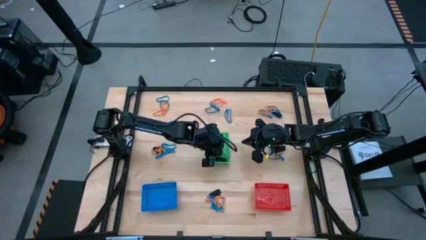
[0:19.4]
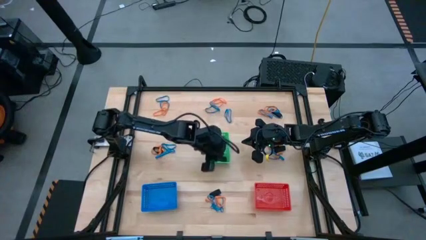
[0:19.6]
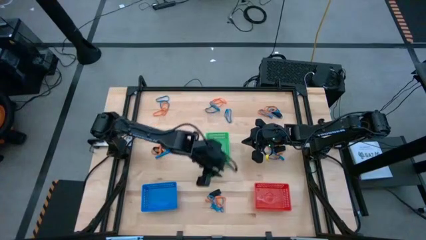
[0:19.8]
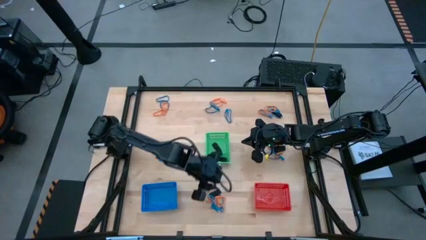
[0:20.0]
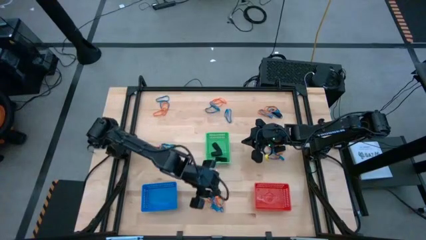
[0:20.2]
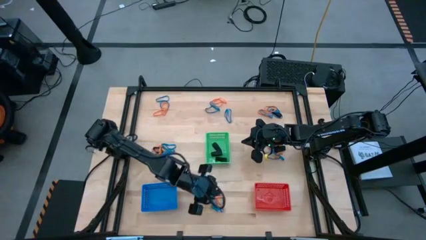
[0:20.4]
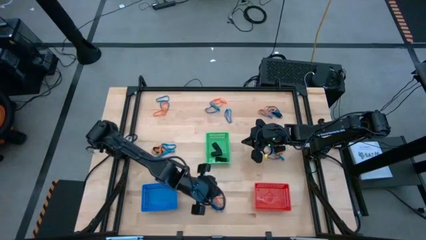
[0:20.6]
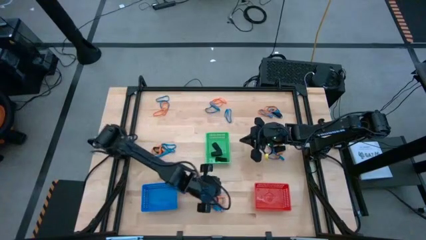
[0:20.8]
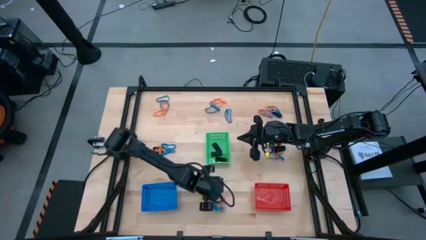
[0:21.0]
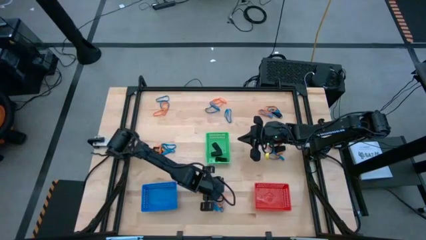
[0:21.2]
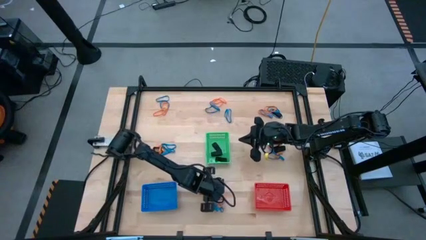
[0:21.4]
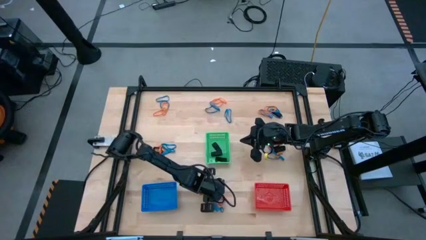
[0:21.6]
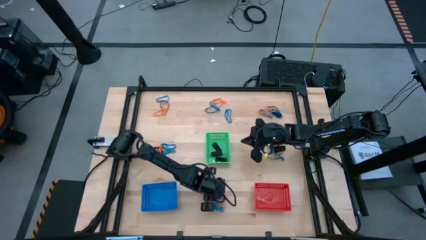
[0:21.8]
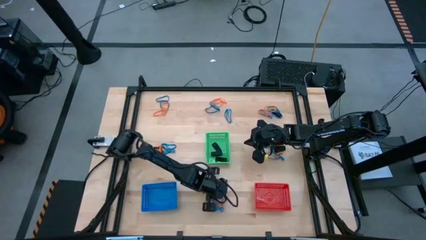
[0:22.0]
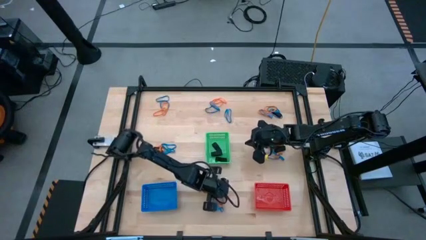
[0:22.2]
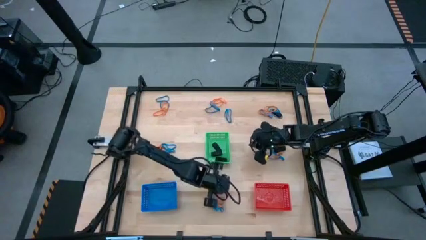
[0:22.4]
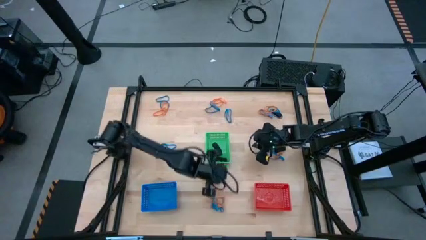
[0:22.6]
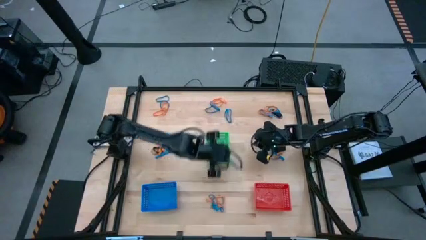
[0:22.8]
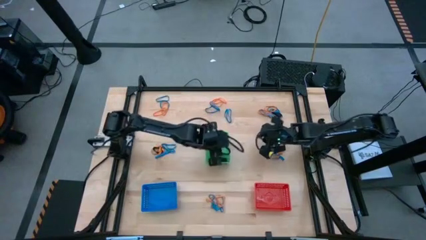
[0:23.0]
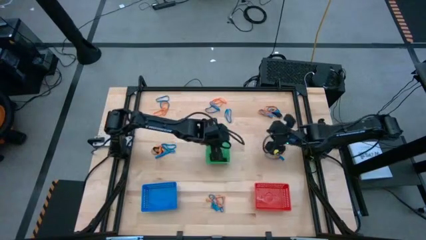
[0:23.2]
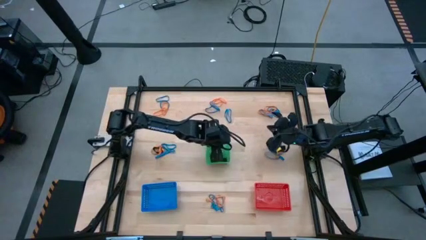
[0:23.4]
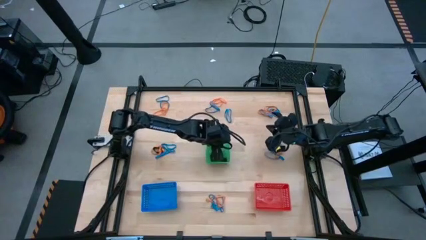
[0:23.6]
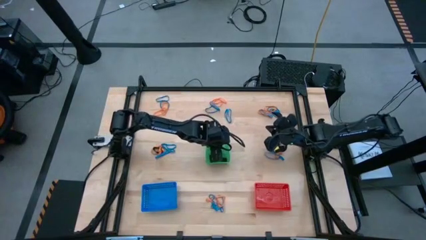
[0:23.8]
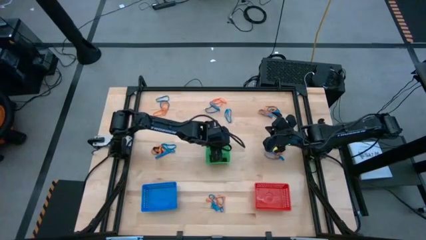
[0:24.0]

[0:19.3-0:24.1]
Task: Sort rubber bands into baskets
Put the black rubber band into the green bin

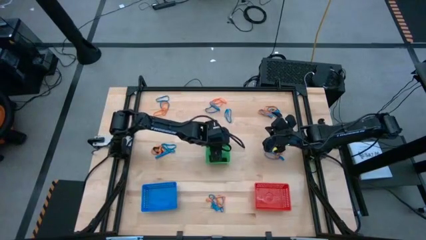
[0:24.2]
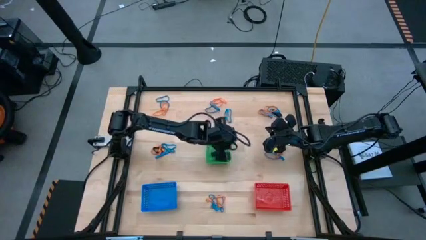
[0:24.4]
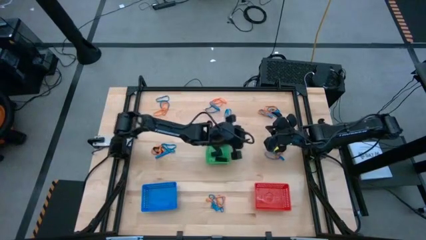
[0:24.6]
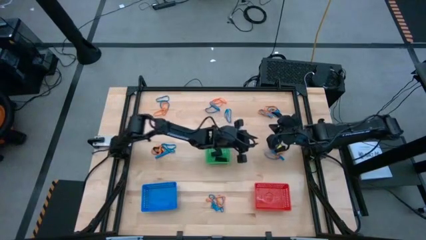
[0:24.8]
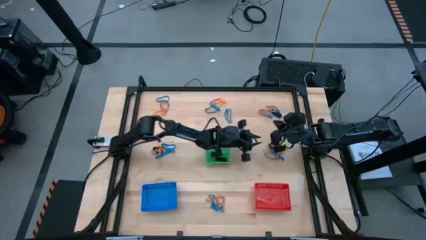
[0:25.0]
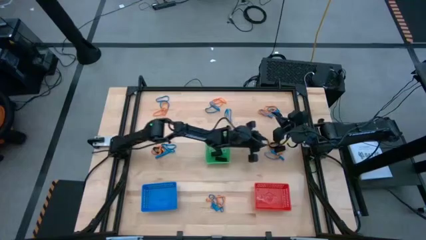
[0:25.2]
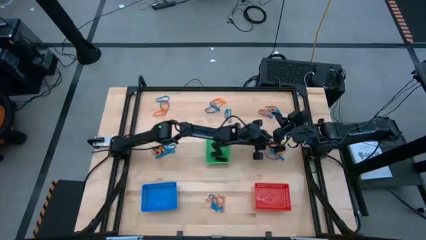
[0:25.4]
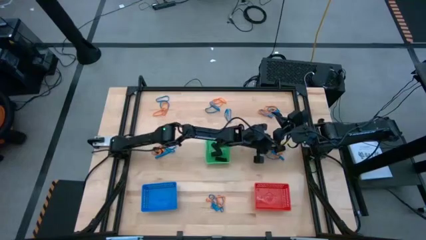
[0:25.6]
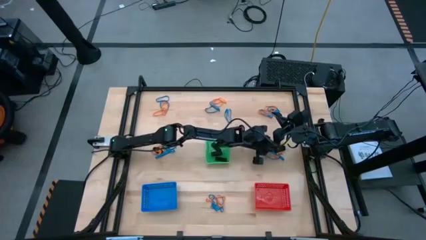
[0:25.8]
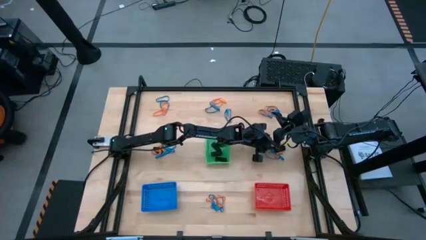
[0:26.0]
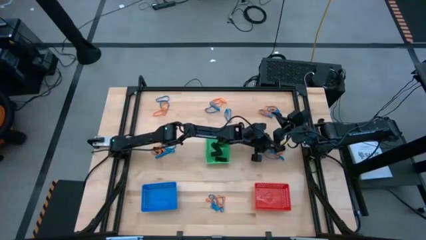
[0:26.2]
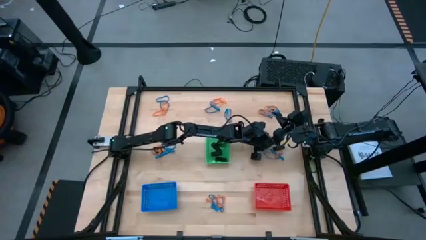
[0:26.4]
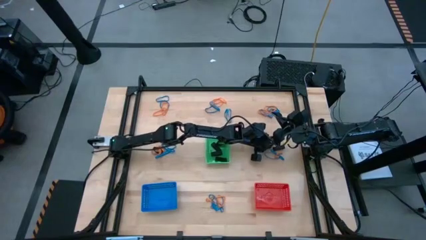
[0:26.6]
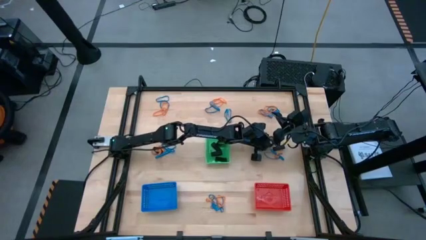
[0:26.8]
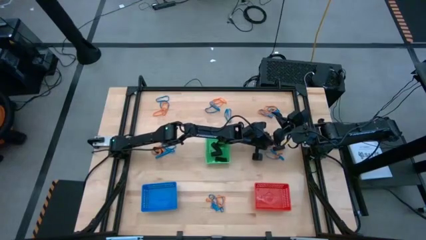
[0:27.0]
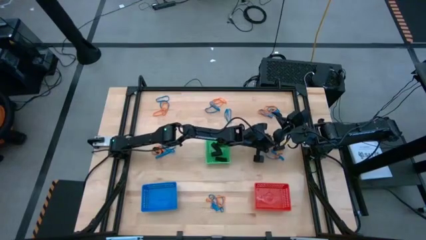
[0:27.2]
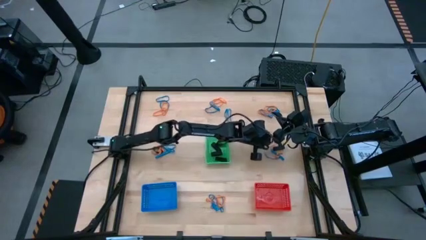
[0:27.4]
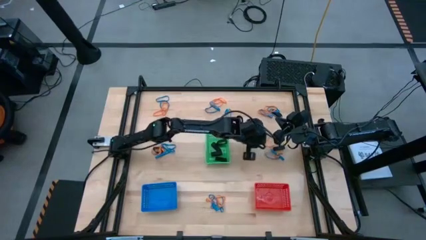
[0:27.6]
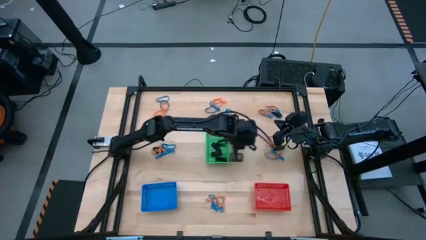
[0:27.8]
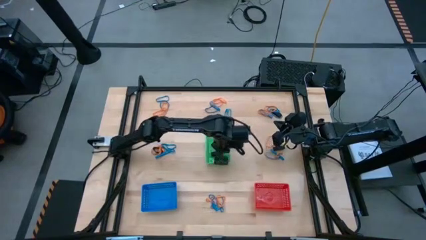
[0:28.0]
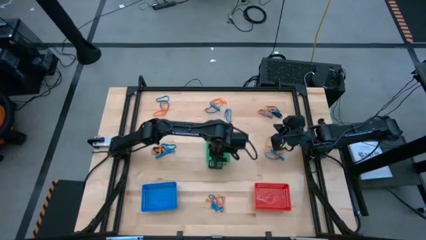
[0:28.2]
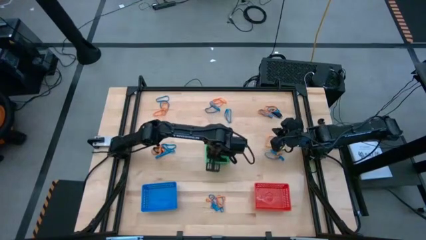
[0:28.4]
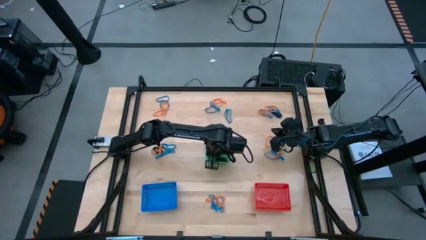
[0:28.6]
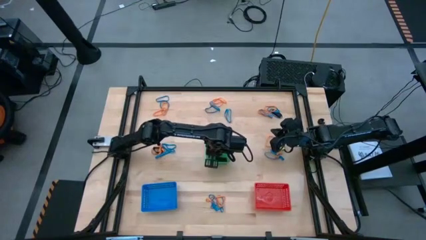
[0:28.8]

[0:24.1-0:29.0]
Put the black rubber band into the green bin

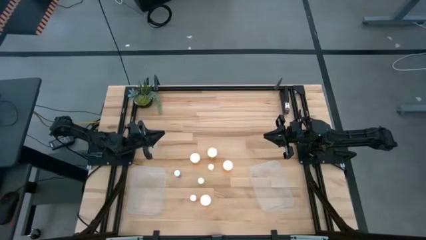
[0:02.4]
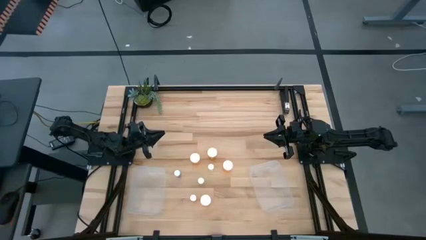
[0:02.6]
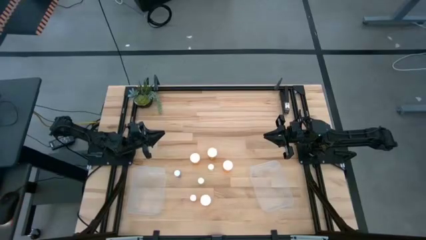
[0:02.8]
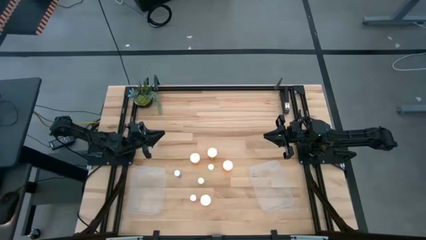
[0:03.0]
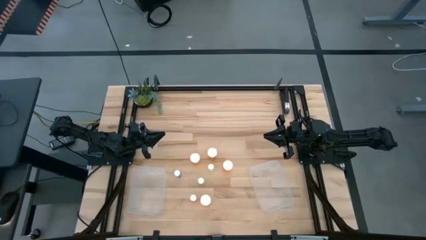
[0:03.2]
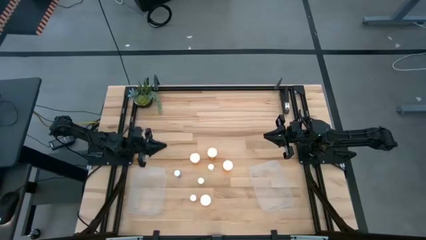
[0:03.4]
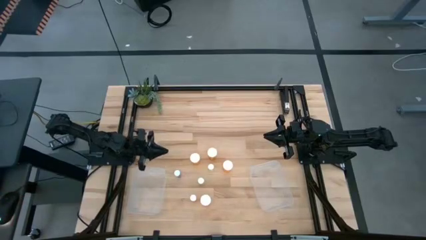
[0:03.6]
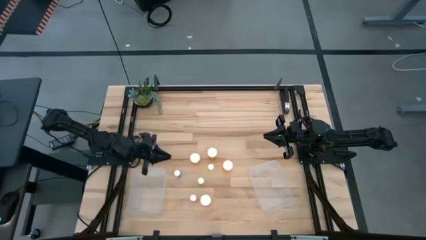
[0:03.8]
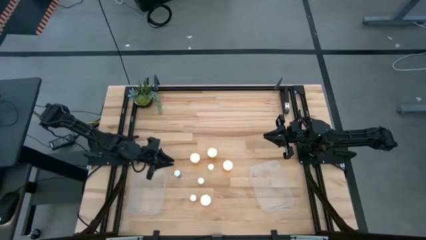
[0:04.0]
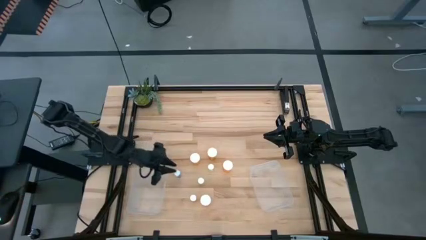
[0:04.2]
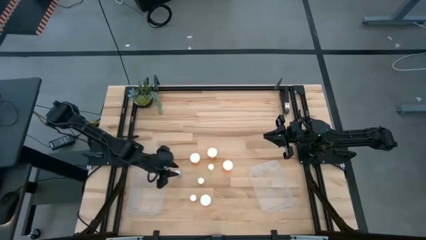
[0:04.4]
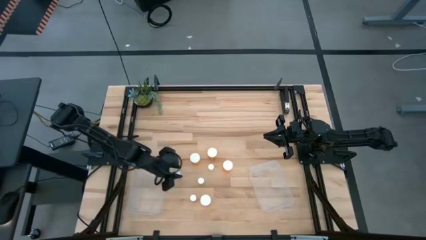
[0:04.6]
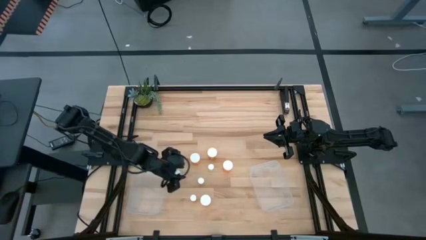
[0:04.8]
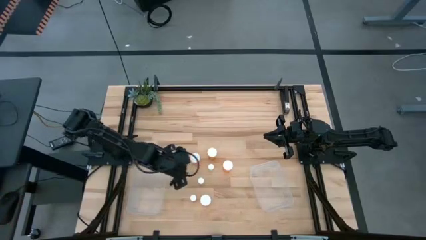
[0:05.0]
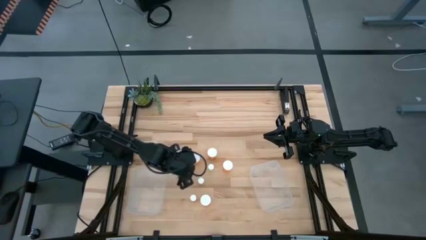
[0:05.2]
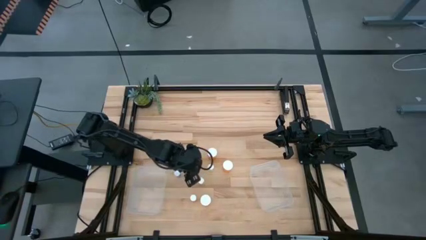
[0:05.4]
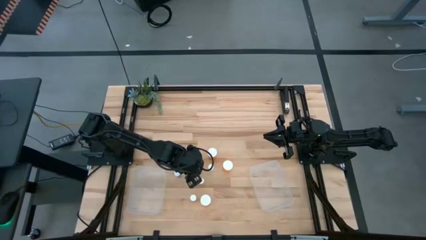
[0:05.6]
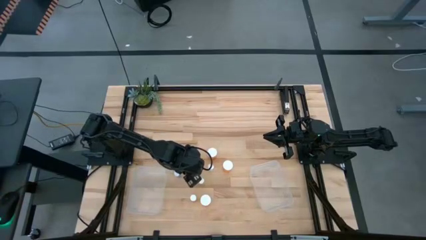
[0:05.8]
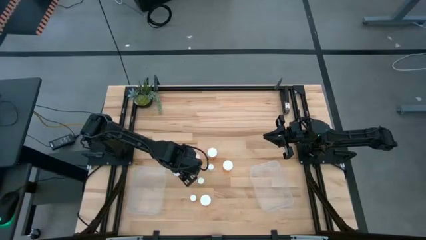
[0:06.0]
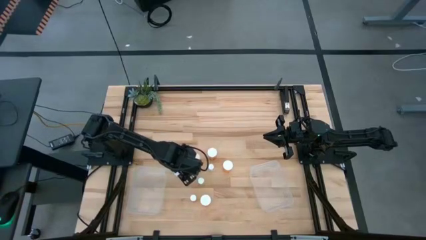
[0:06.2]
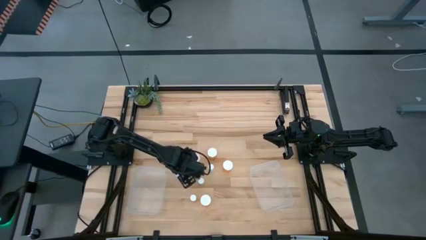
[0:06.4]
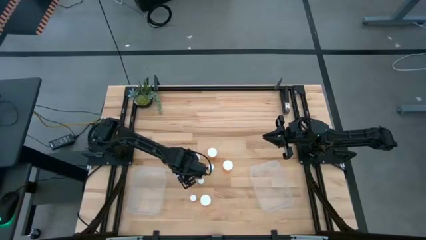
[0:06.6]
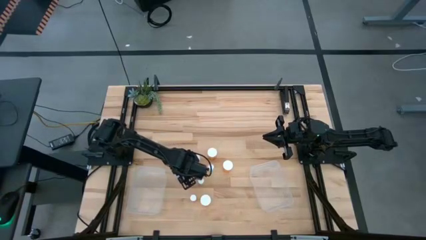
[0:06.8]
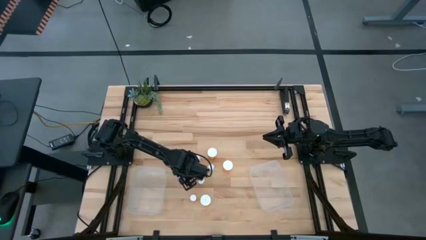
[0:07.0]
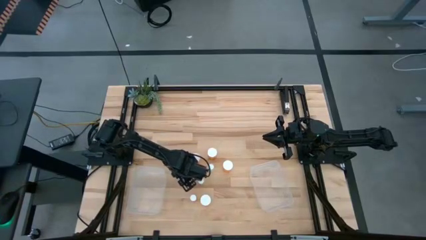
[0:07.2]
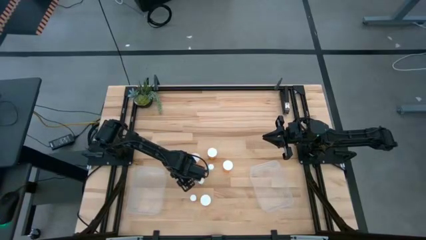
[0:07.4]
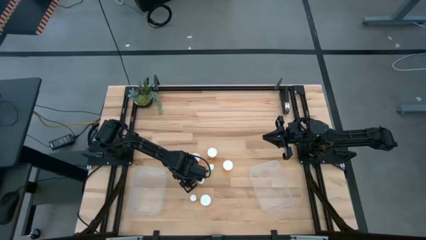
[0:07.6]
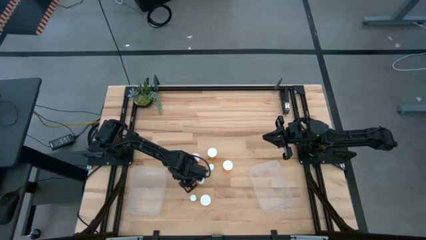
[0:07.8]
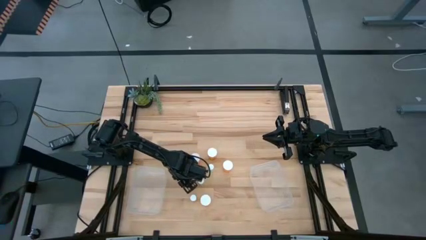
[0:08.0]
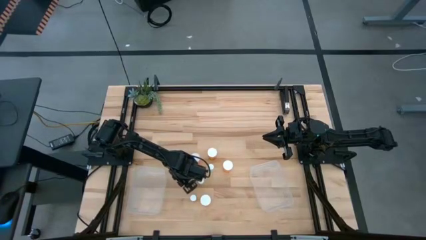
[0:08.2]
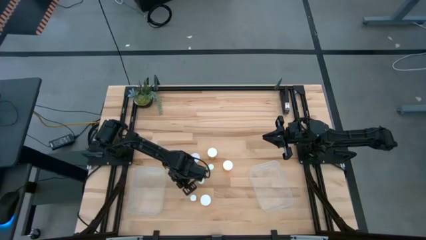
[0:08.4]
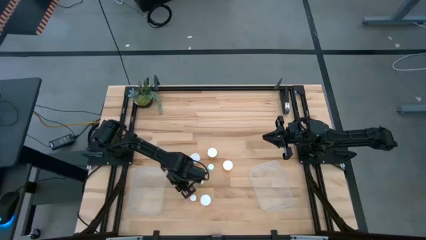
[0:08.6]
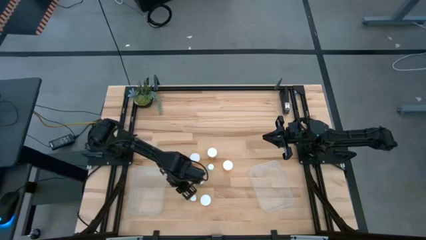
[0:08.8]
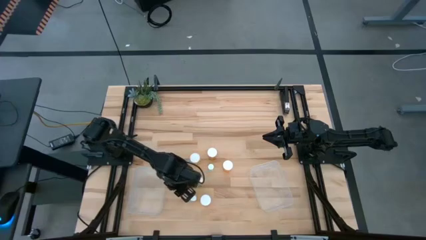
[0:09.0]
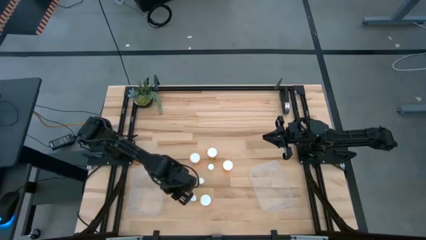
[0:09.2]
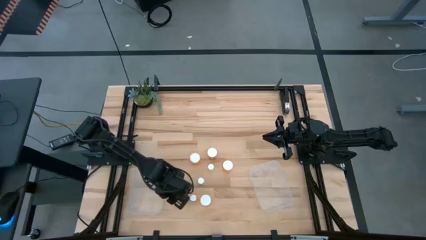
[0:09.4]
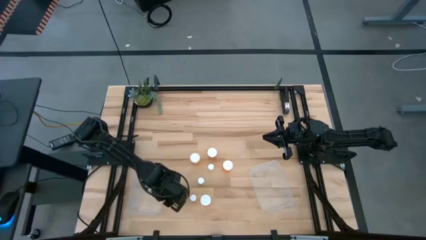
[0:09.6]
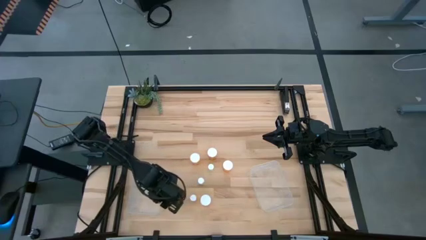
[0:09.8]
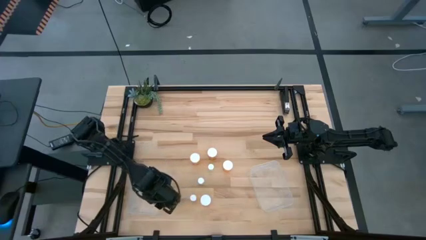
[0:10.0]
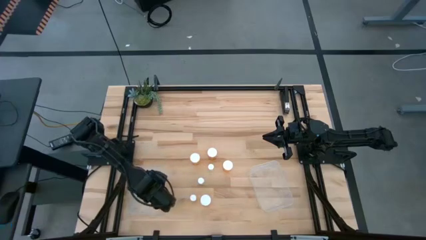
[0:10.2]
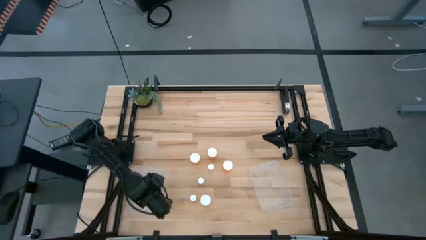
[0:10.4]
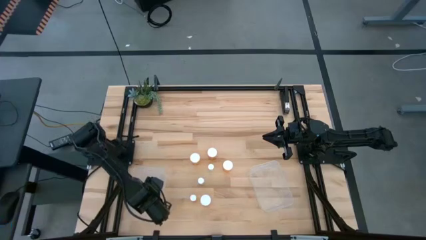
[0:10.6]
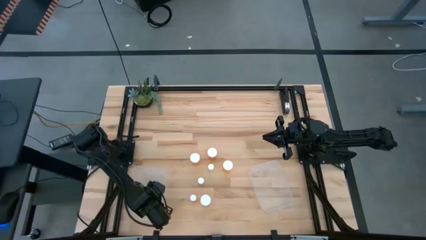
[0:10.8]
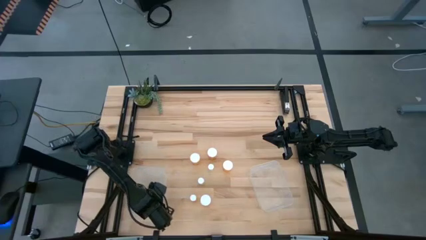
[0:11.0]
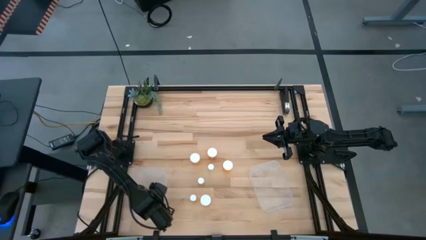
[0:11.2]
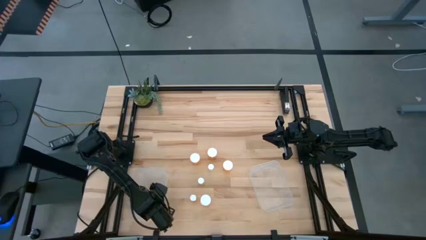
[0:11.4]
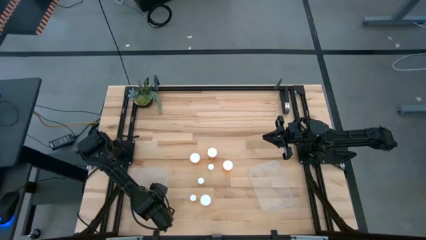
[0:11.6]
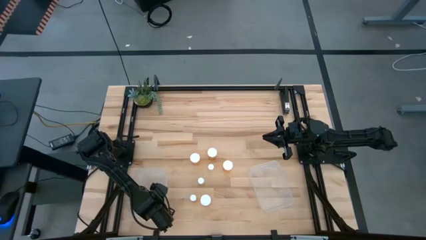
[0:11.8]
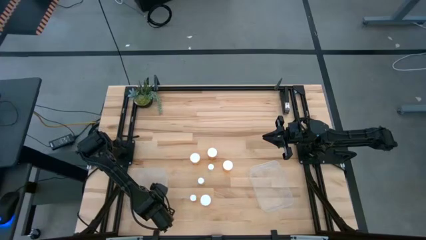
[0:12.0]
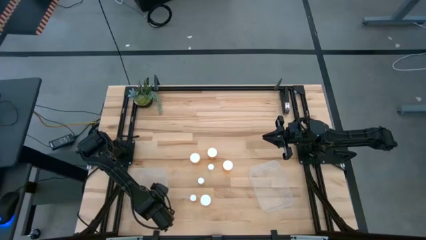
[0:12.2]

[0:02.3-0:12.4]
Task: Pick and place medicine bottles into bin by pill shape (circle, oval)
Put the small blue pill bottle into the left transparent bin
